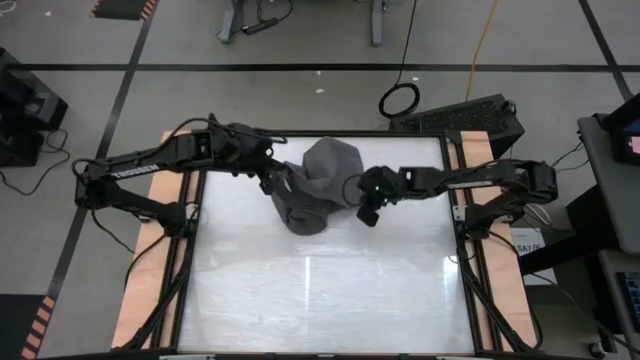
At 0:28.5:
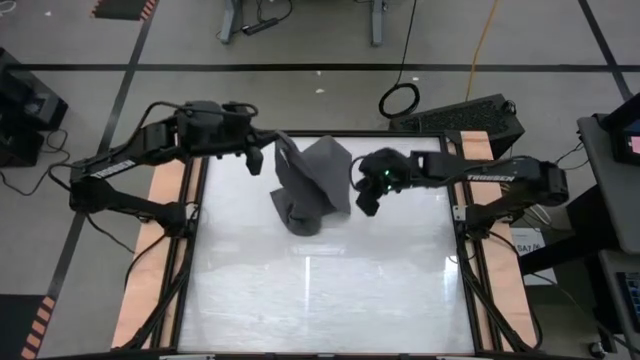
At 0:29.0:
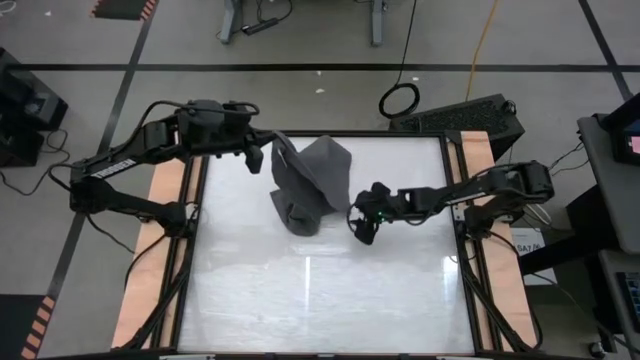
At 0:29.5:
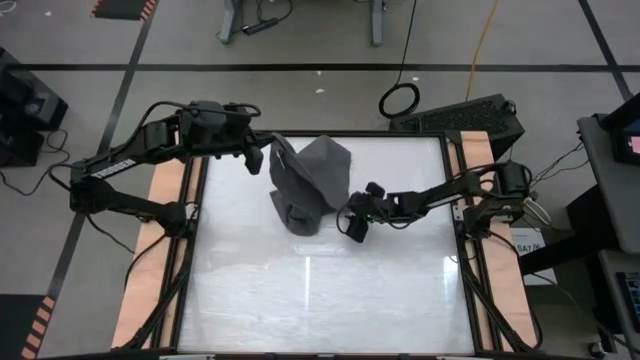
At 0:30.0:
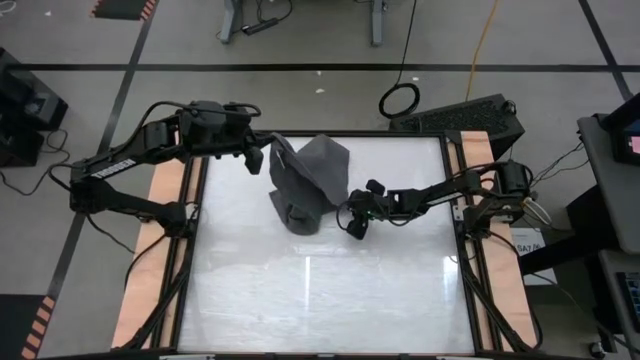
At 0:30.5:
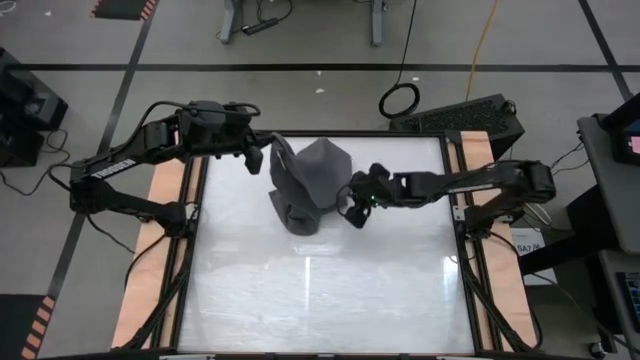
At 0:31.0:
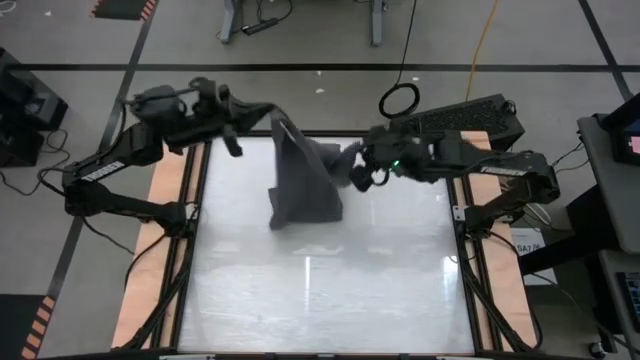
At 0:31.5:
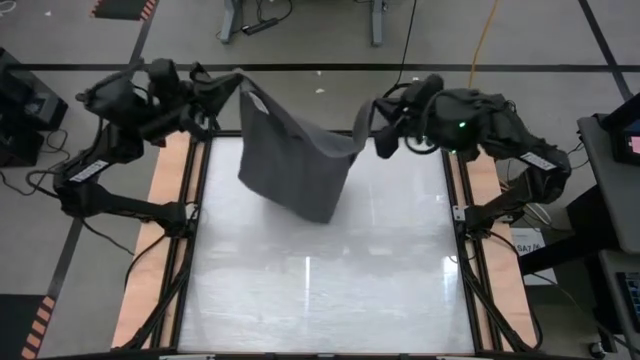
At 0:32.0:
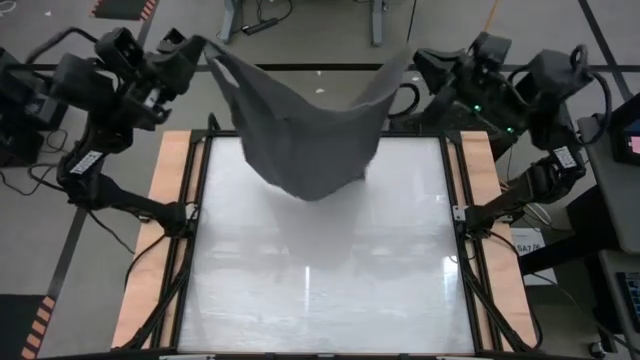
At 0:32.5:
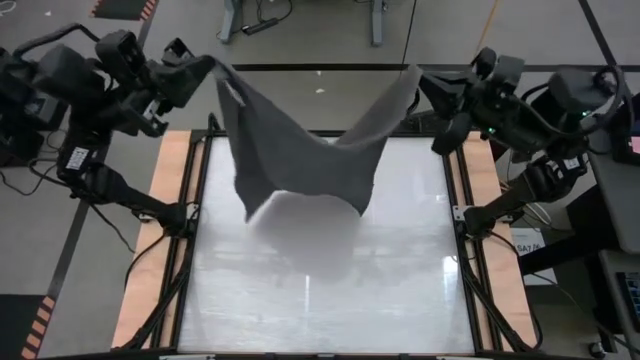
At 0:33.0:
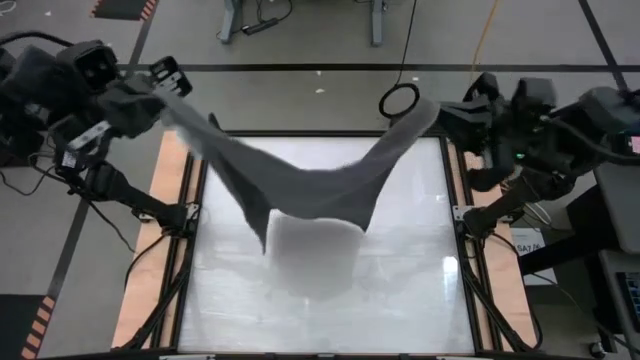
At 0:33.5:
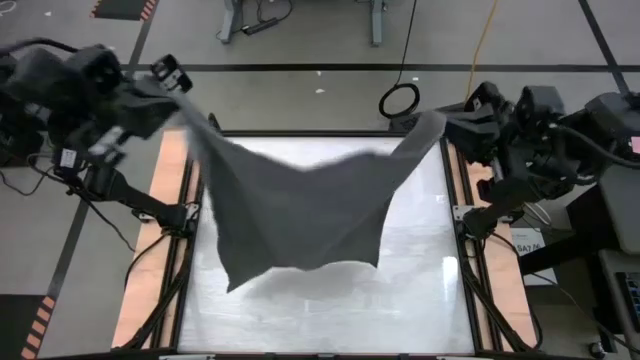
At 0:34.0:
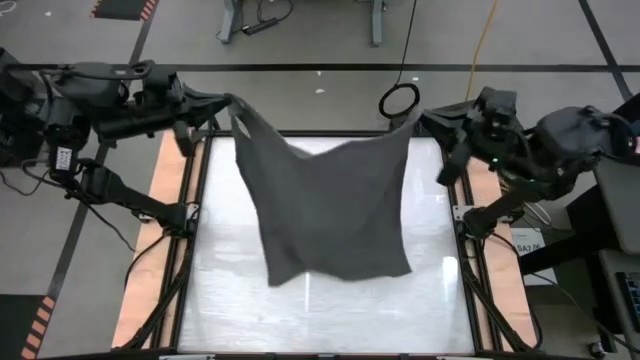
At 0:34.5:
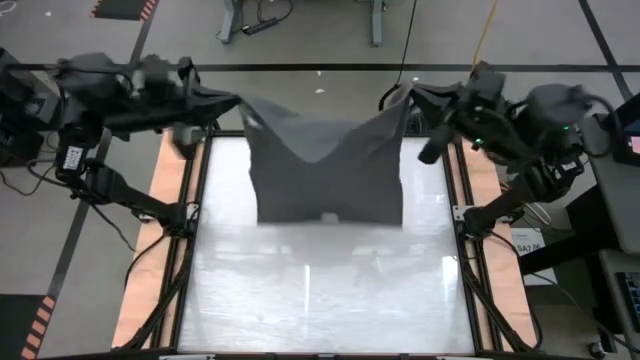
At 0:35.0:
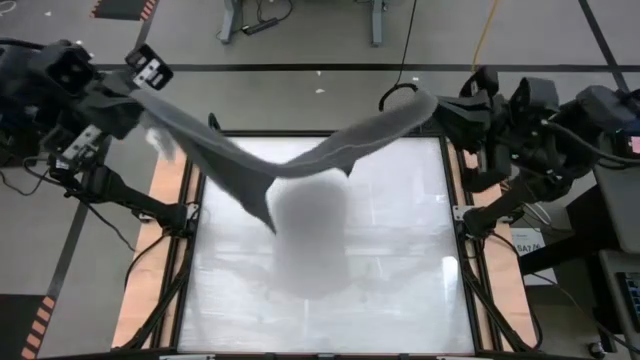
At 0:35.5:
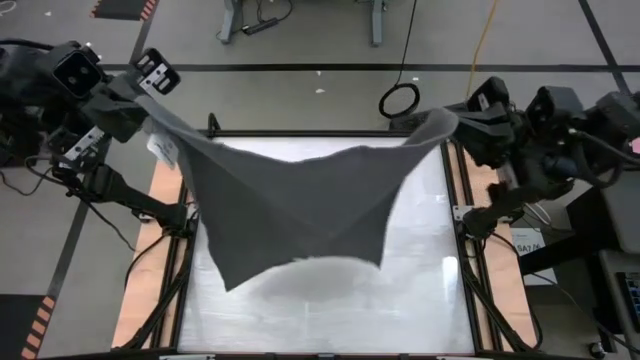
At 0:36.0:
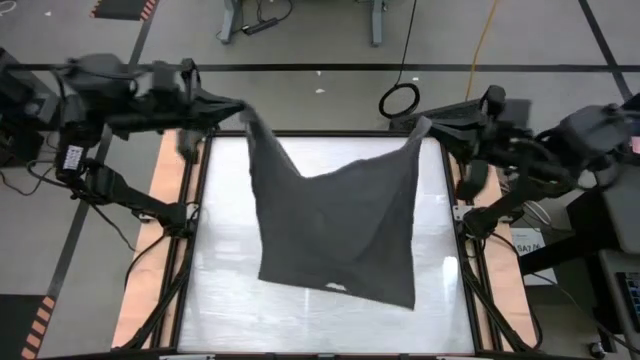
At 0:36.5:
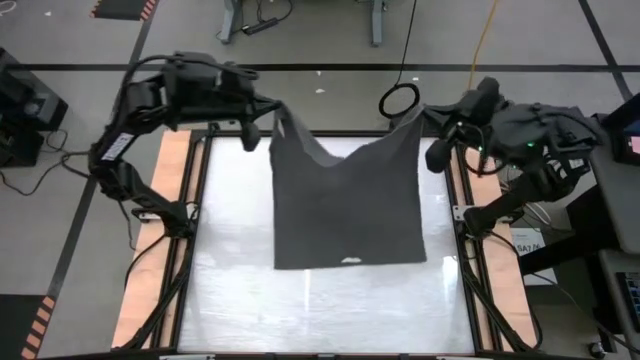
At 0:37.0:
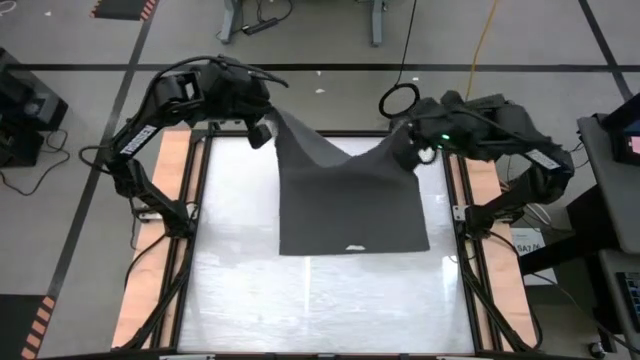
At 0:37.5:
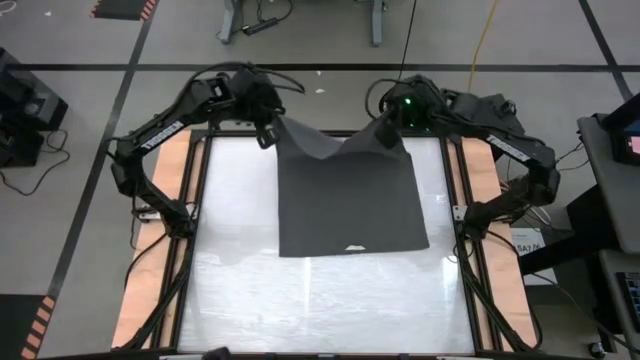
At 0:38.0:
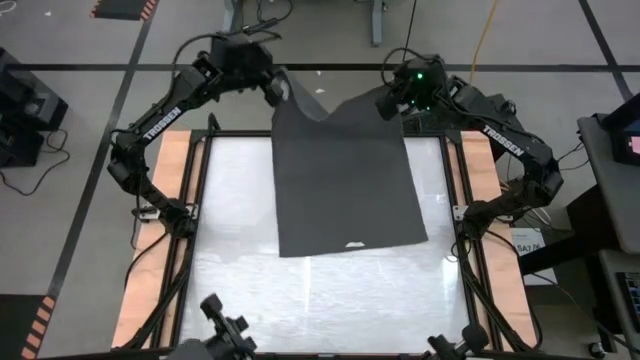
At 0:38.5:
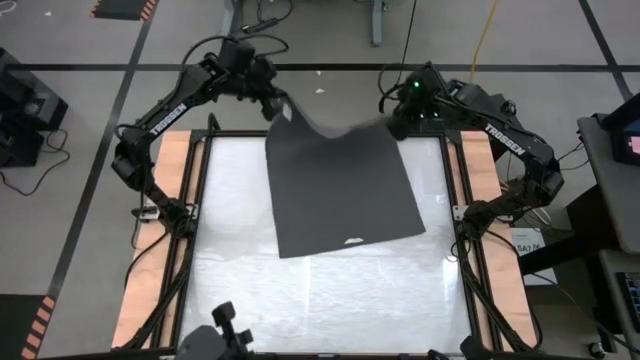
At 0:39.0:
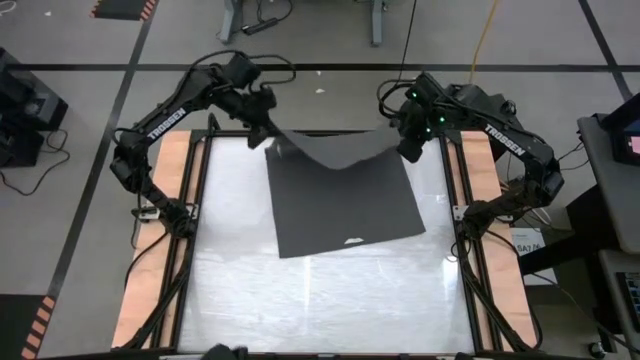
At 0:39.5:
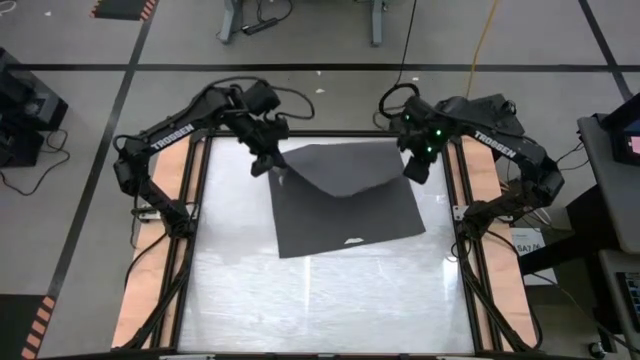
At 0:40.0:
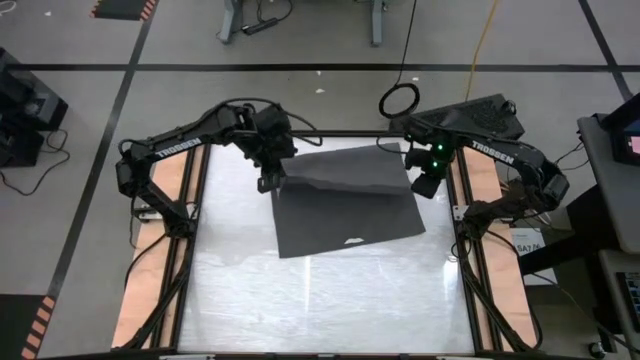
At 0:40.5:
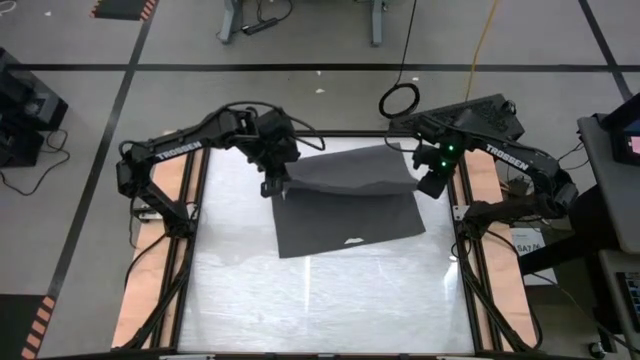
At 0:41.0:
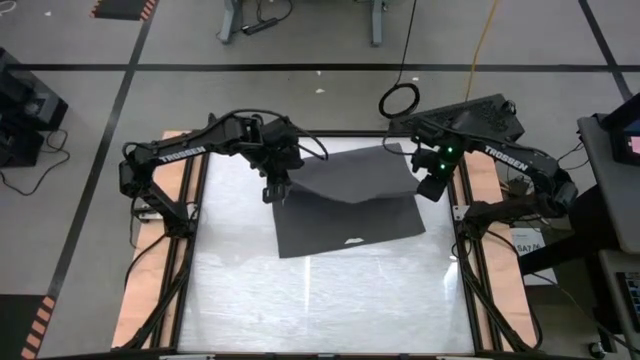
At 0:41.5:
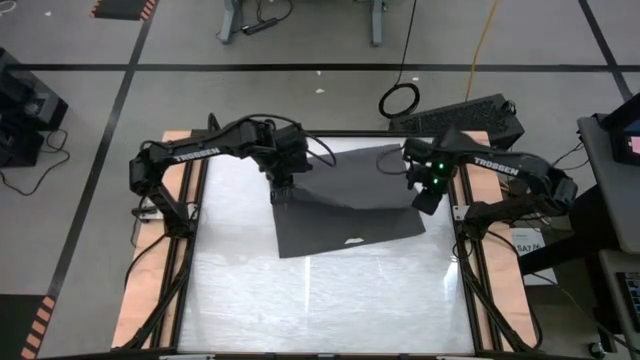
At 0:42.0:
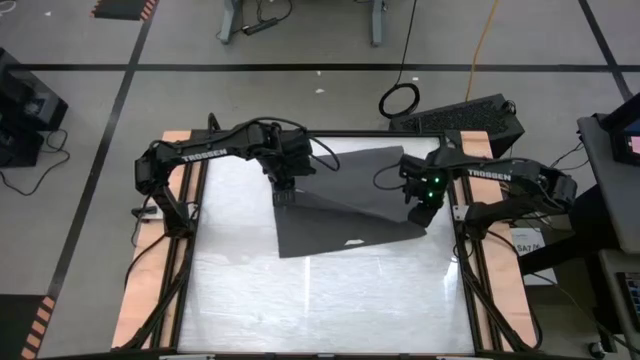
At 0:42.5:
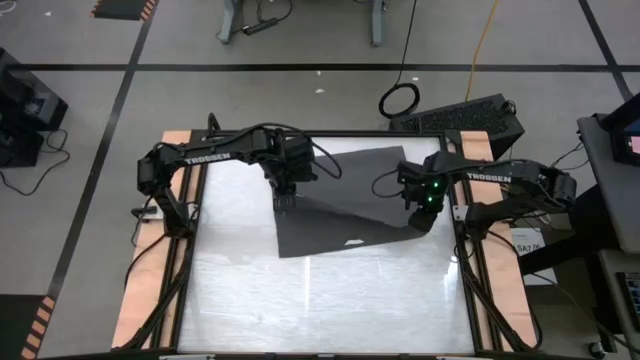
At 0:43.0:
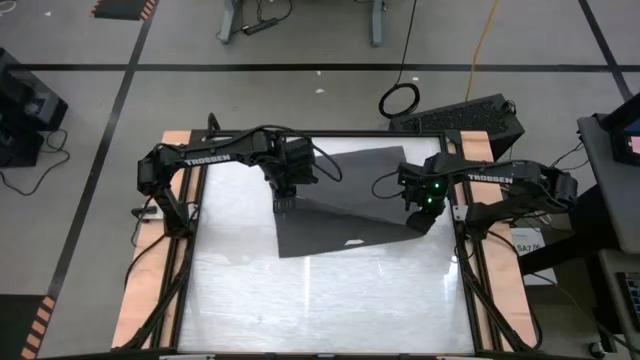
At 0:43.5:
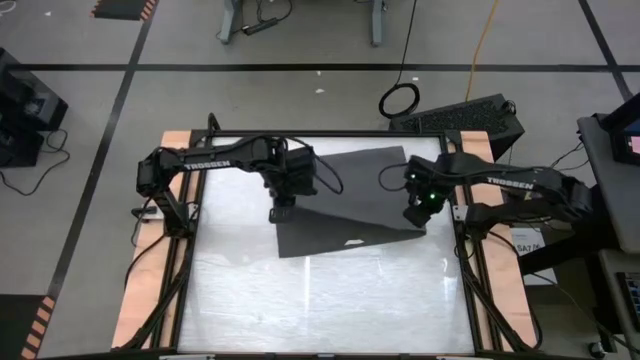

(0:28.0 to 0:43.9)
Task: Roll towel
Roll the gray towel
